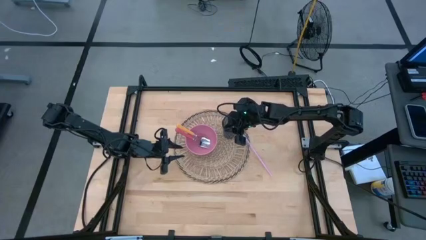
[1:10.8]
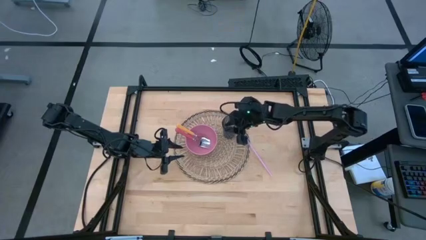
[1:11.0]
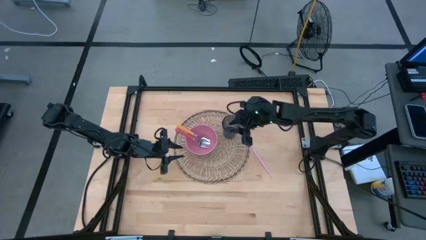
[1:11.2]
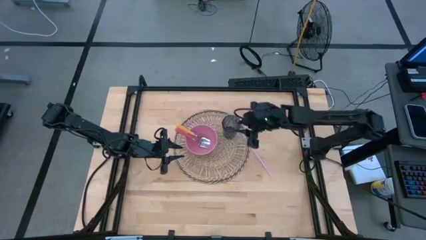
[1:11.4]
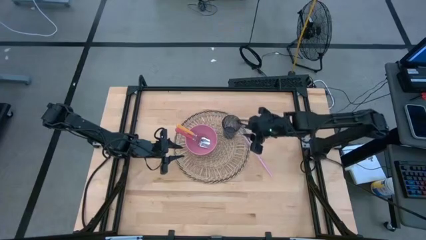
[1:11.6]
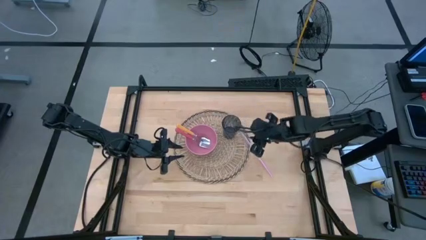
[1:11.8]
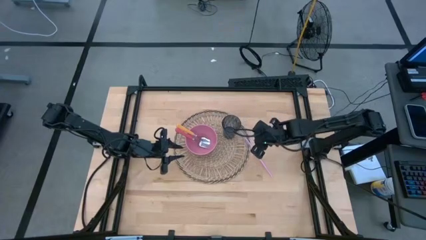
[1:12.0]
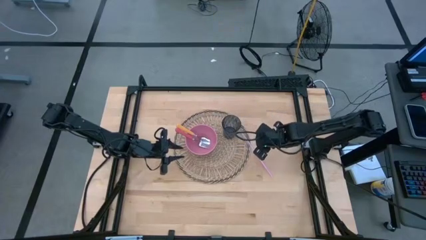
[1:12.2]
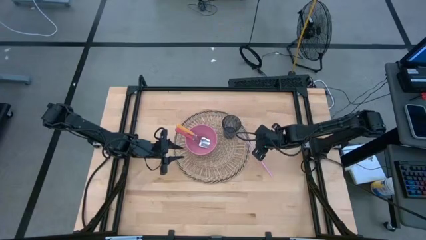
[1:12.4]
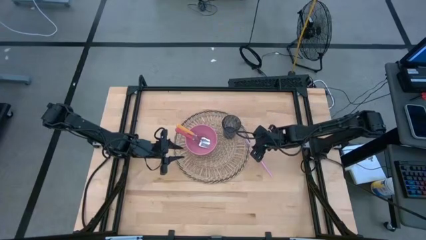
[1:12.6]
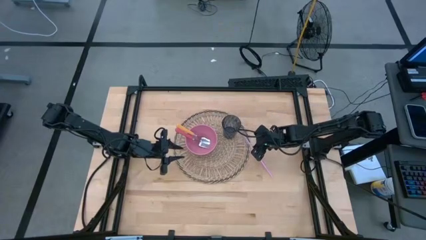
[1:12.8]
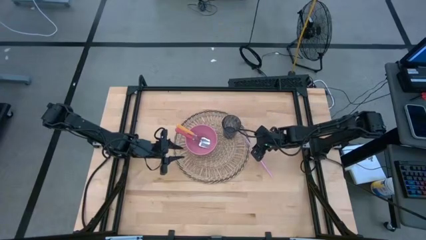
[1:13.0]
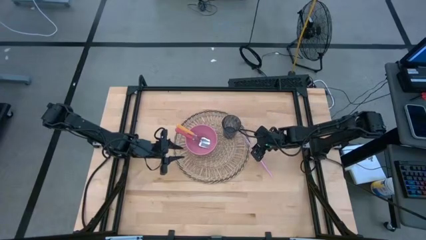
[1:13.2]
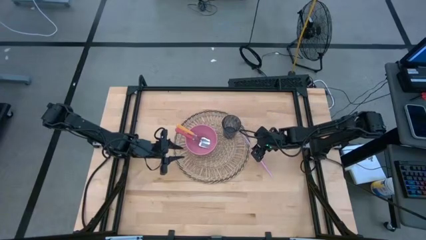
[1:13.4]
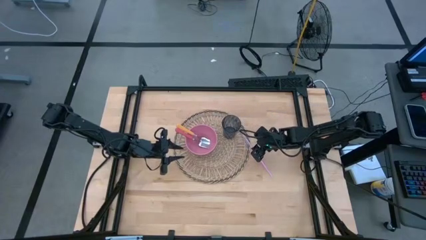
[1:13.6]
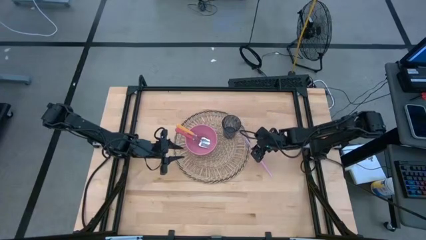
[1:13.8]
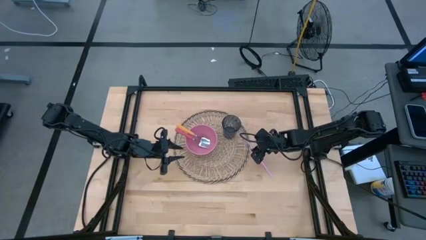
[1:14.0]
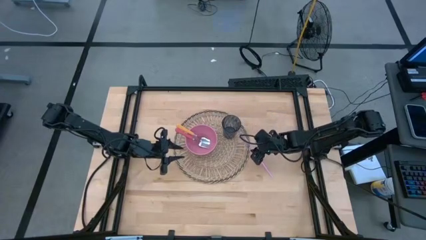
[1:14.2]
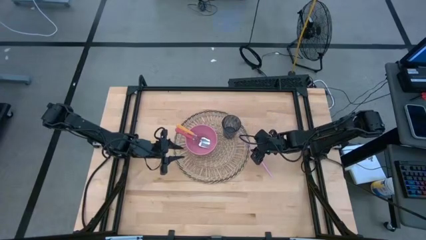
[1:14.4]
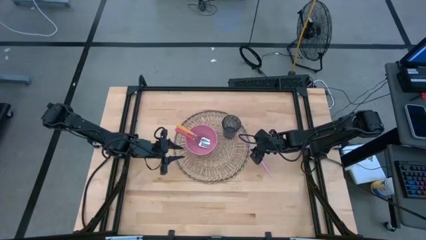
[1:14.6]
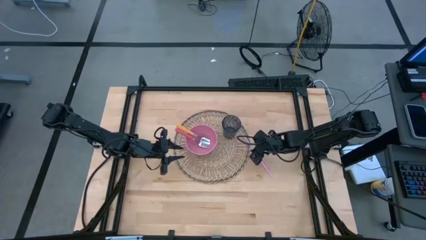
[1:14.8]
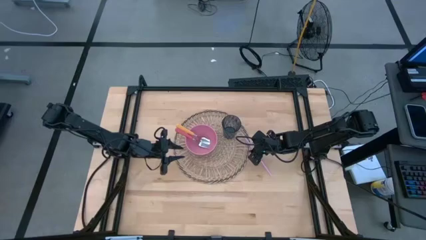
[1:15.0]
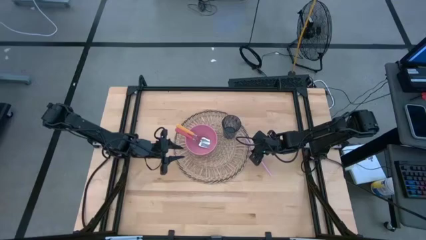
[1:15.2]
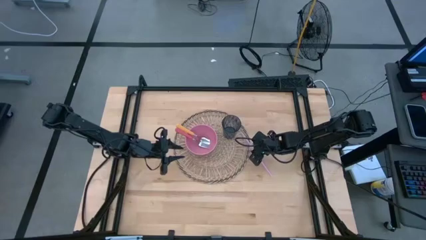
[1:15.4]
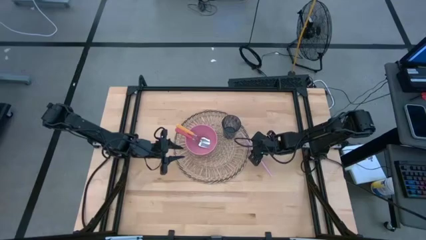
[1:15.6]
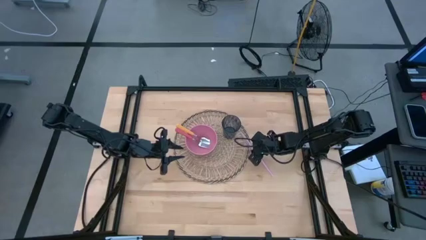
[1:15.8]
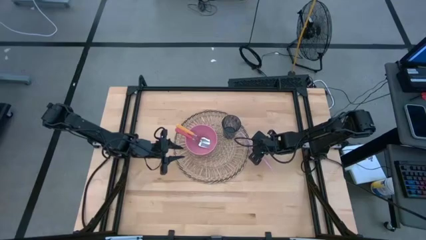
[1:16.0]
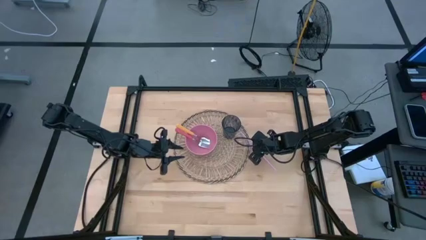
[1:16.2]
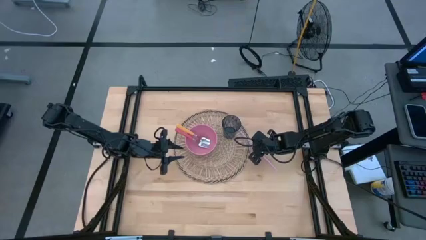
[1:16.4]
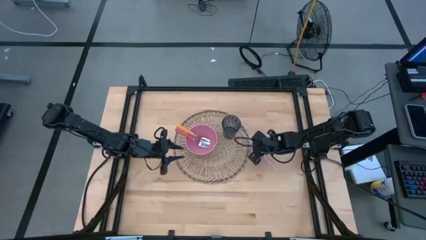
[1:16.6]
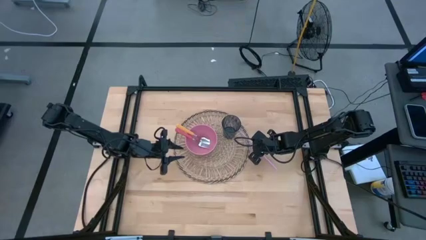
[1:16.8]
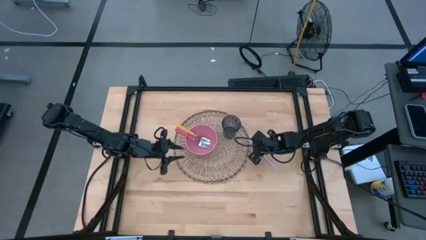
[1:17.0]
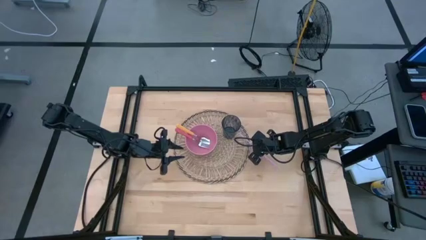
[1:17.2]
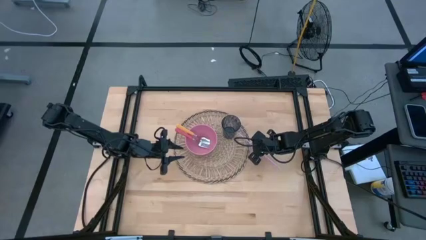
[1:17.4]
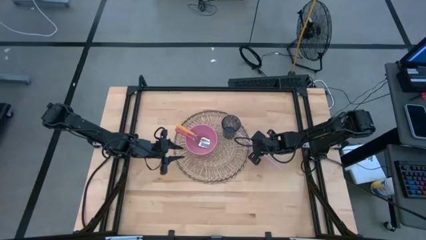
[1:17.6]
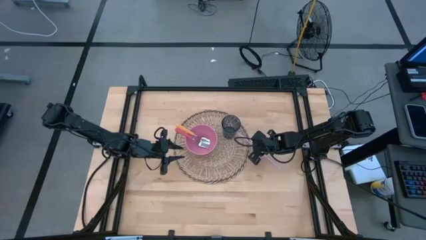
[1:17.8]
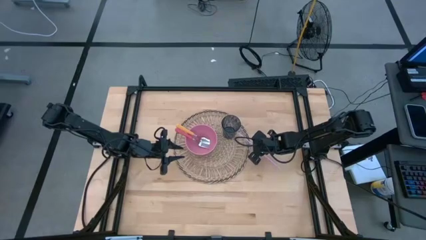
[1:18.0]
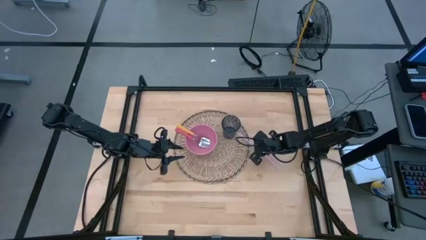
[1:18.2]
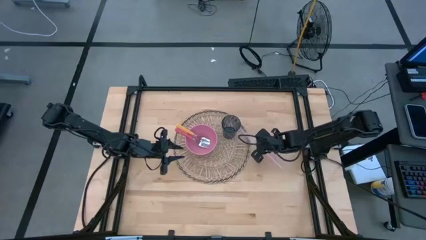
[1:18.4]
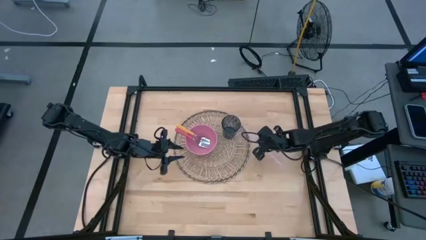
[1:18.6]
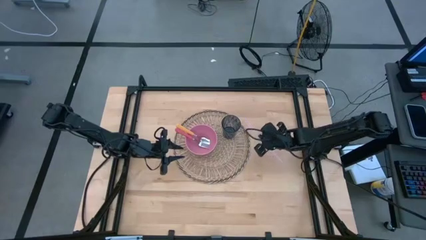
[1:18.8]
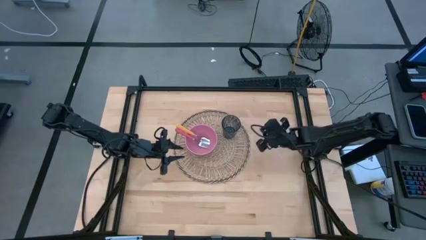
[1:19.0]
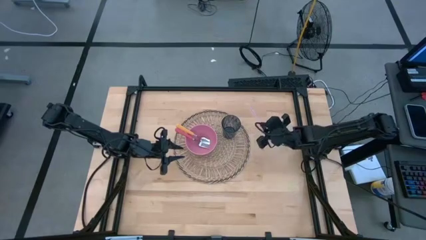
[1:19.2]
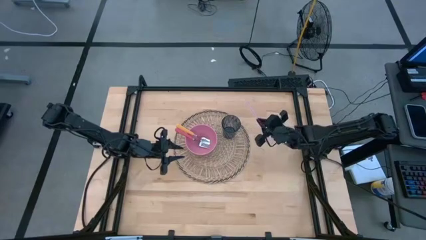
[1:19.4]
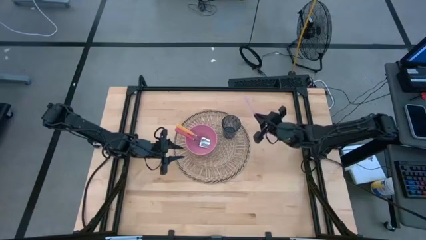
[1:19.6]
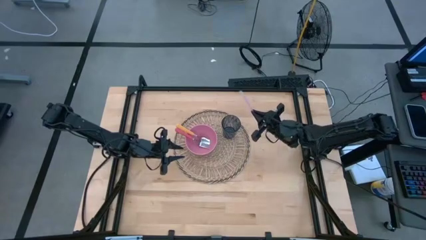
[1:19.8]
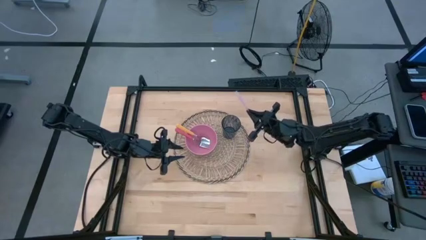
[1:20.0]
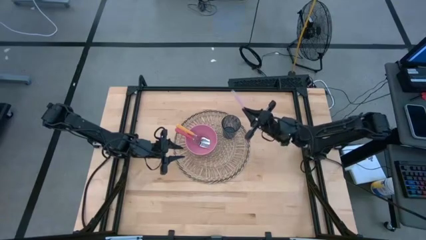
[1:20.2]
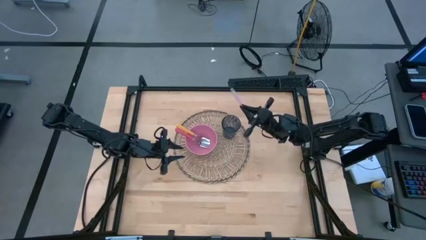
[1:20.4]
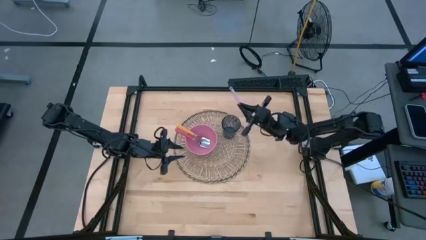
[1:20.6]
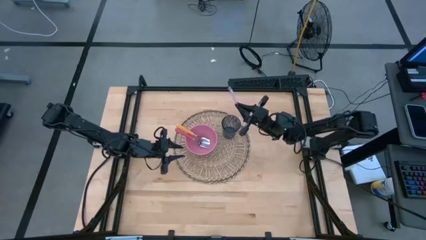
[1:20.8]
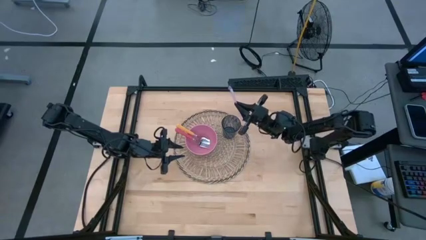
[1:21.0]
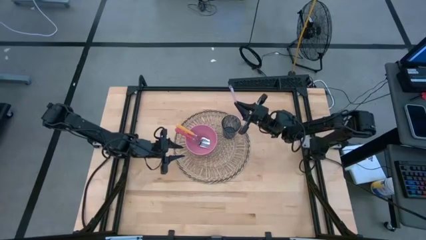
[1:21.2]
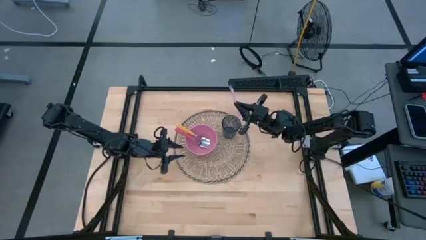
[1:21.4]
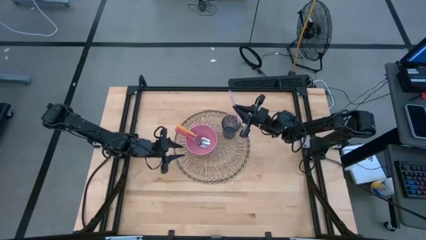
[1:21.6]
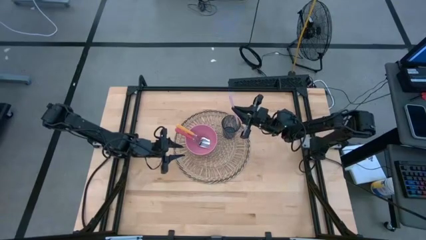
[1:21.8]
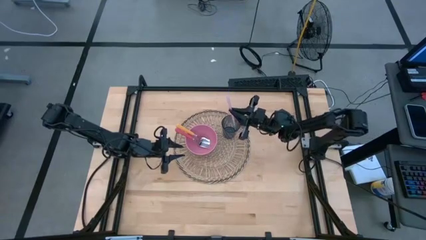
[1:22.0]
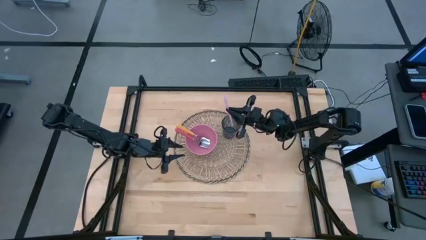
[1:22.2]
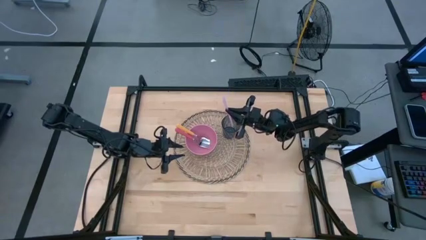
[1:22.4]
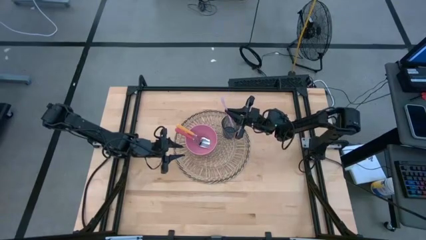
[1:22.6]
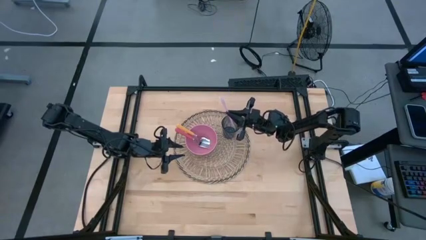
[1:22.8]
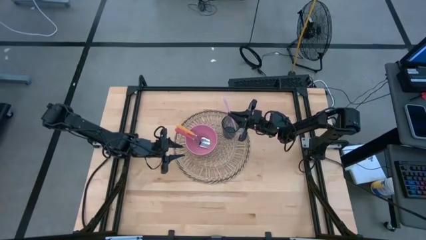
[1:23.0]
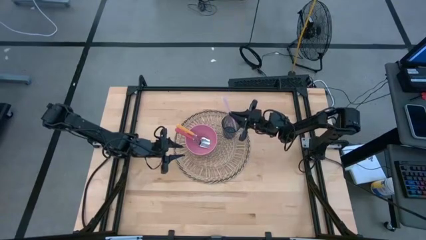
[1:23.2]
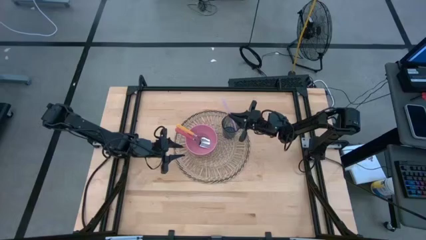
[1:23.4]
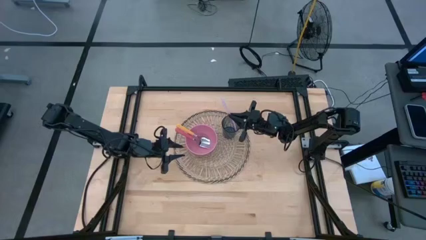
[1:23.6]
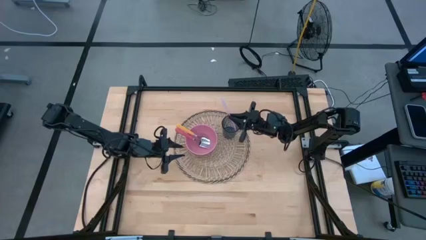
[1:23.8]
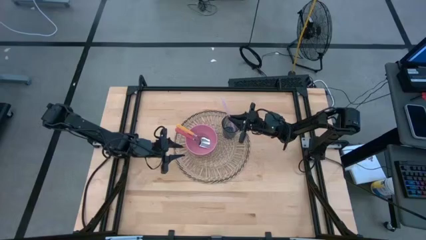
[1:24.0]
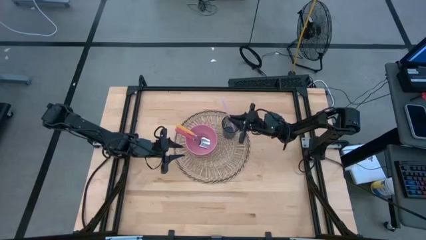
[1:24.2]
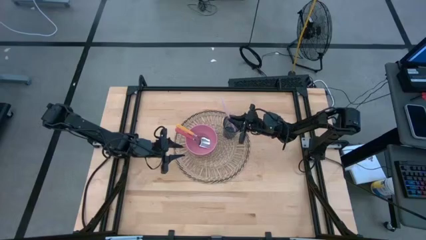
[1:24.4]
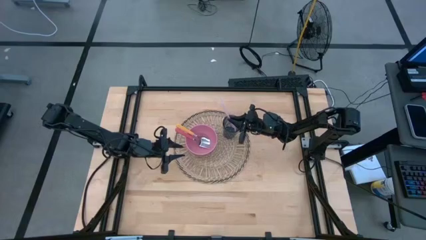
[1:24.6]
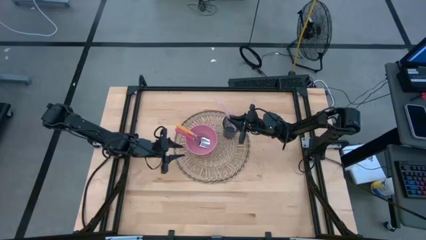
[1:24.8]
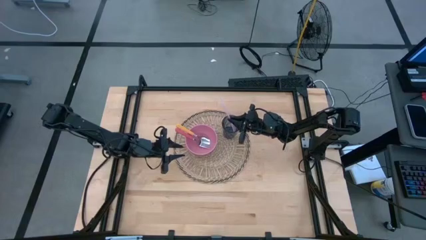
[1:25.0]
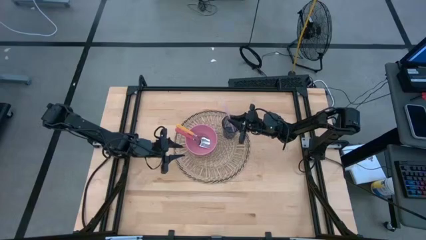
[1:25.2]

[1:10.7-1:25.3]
Task: Pick & Place Utensil
Put the pink straw into the blue cup

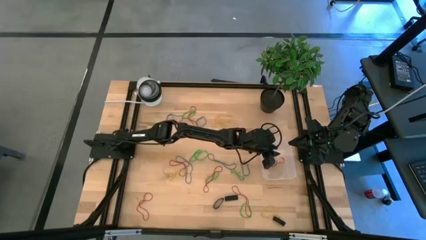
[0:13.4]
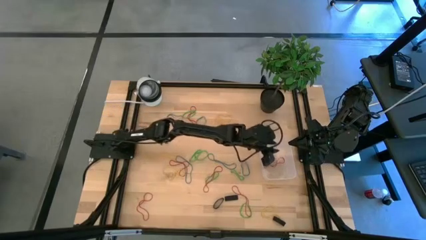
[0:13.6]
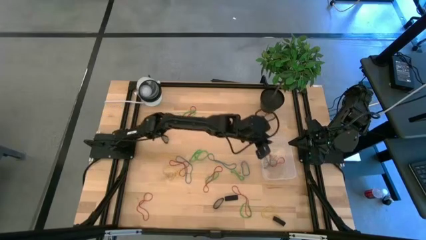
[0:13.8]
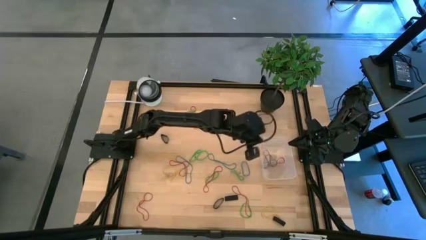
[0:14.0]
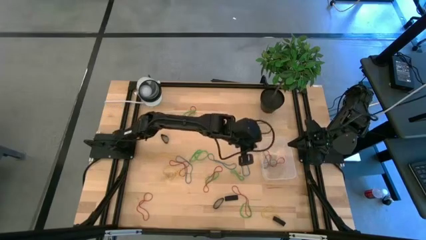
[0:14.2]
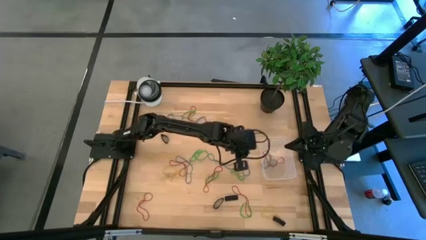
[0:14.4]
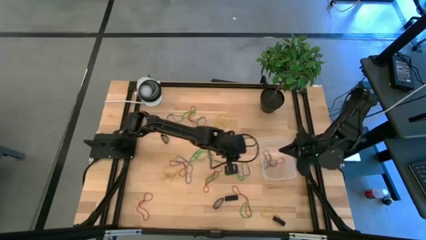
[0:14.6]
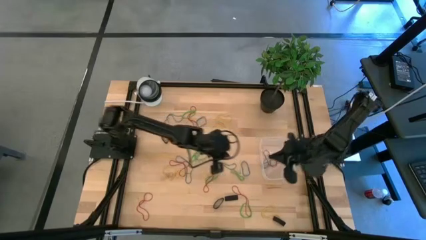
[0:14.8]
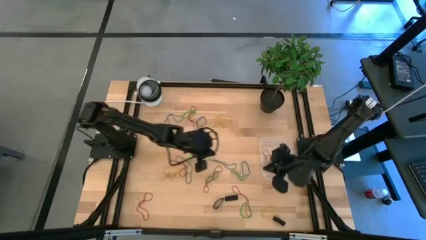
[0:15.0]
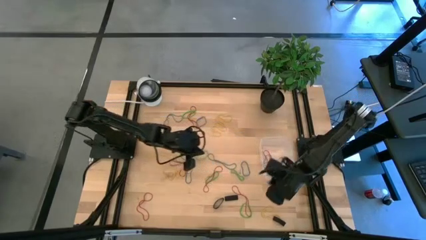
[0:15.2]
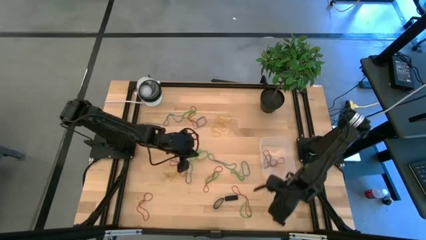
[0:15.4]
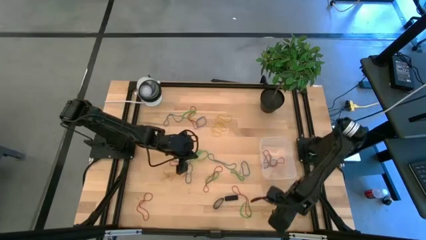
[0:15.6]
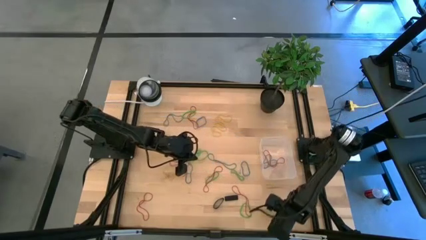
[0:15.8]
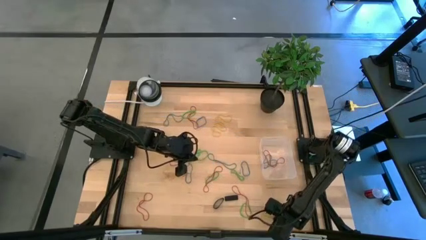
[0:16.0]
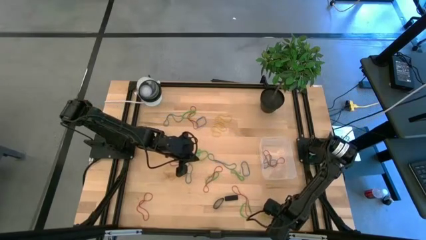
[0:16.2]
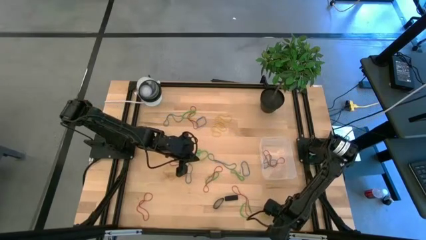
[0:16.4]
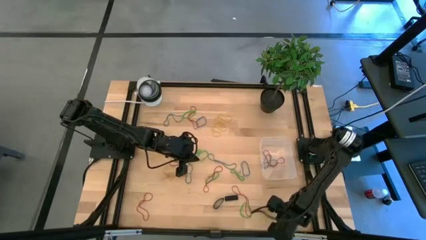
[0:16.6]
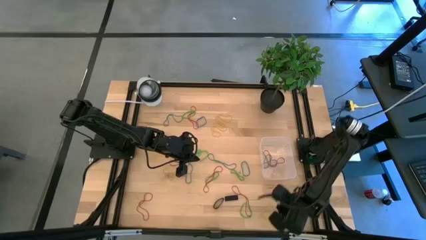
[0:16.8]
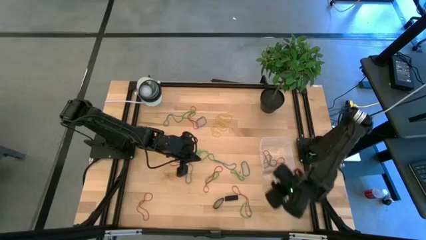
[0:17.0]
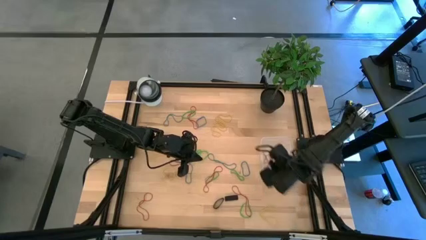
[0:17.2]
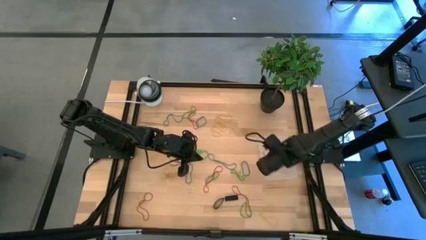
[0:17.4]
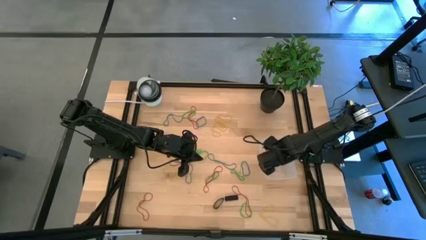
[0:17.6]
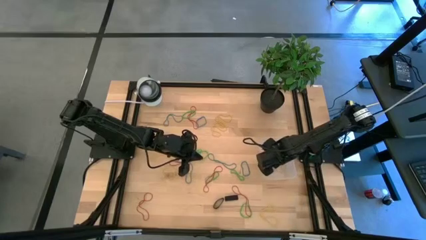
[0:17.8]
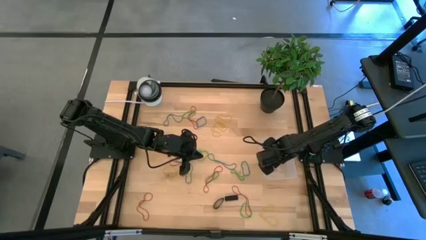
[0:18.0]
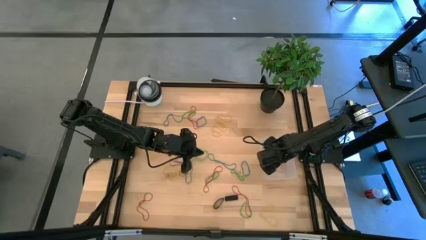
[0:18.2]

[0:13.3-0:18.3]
Task: Pick and place rubber bands into bin
Put the black rubber band into the transparent bin
